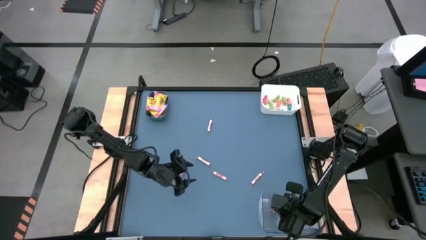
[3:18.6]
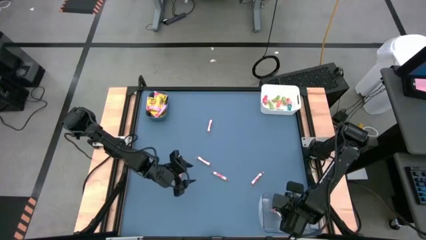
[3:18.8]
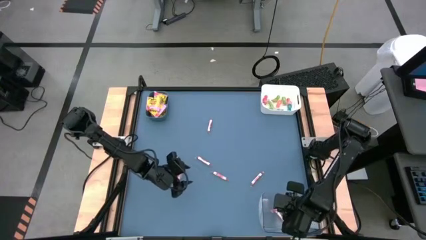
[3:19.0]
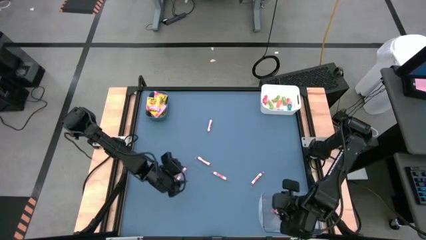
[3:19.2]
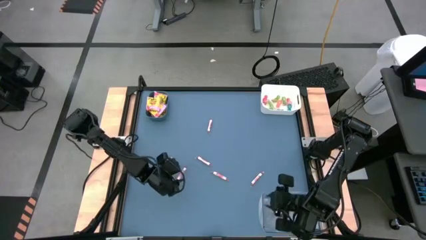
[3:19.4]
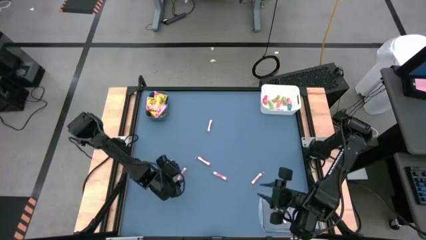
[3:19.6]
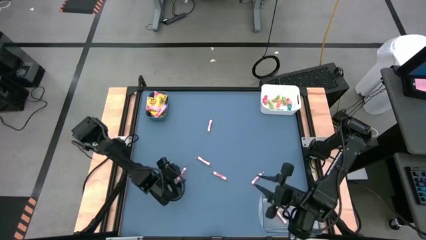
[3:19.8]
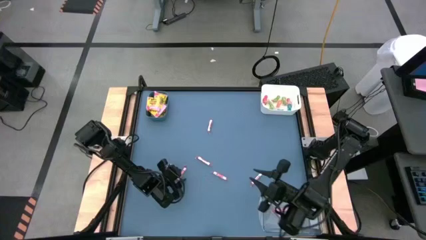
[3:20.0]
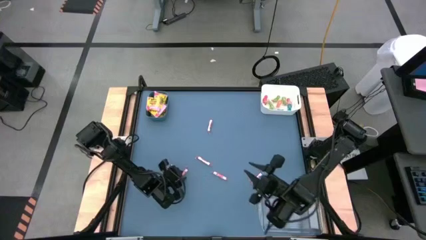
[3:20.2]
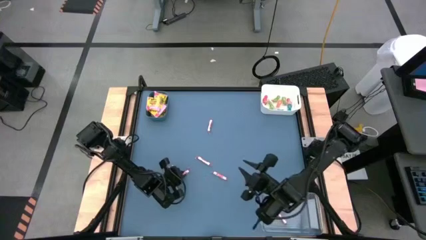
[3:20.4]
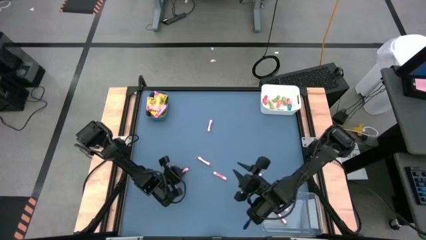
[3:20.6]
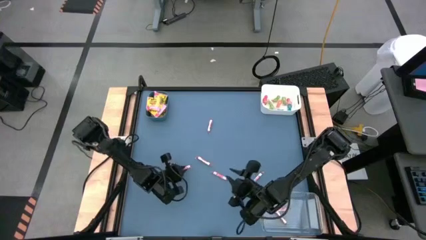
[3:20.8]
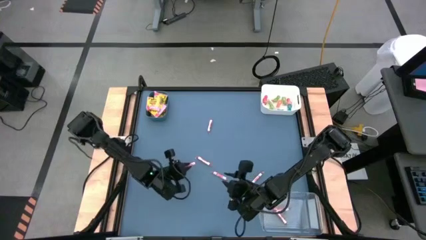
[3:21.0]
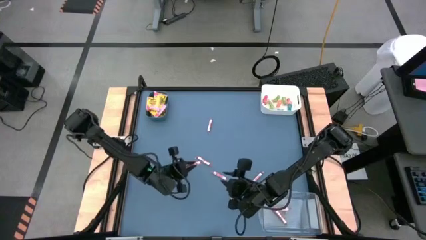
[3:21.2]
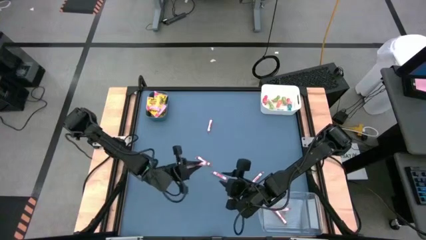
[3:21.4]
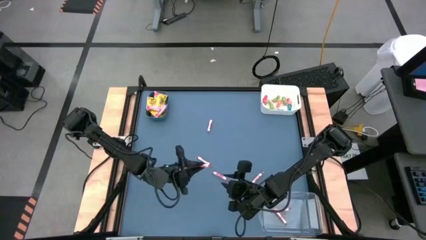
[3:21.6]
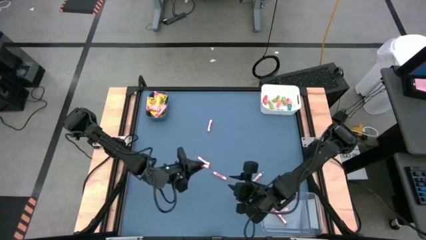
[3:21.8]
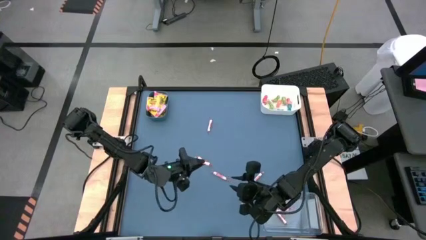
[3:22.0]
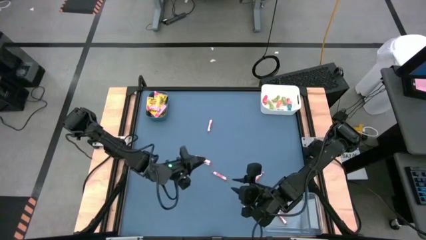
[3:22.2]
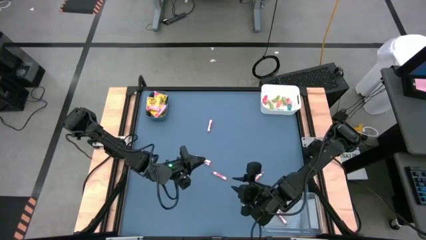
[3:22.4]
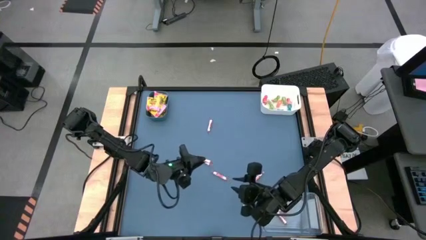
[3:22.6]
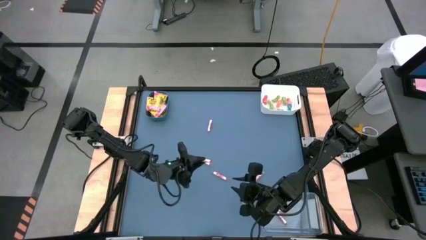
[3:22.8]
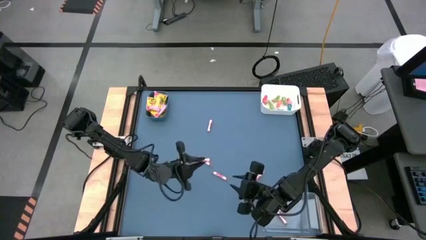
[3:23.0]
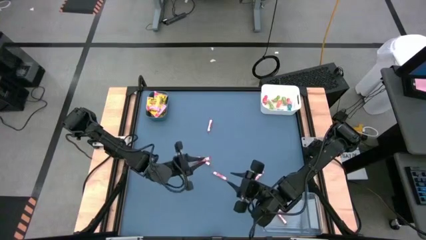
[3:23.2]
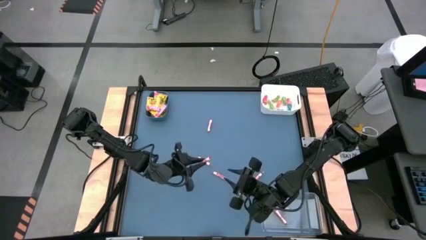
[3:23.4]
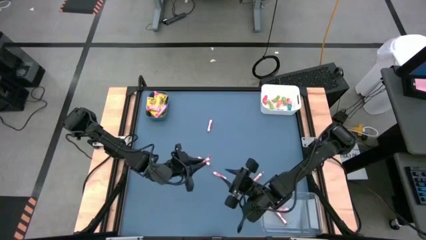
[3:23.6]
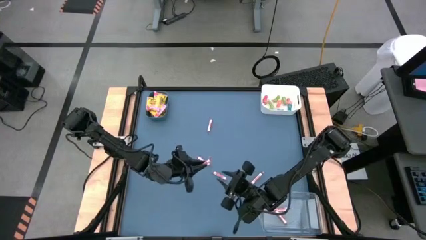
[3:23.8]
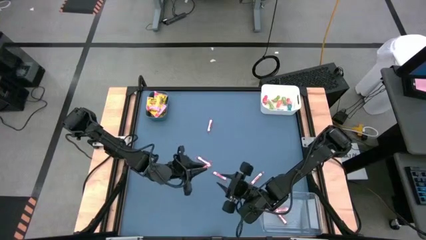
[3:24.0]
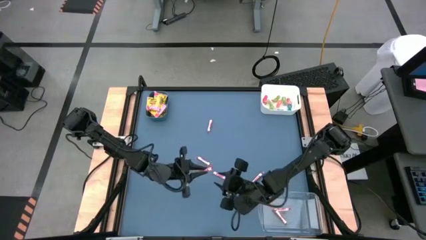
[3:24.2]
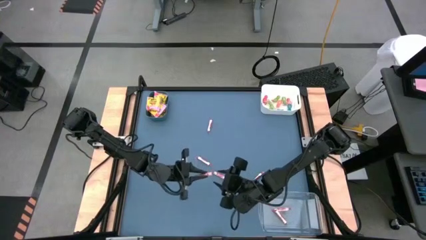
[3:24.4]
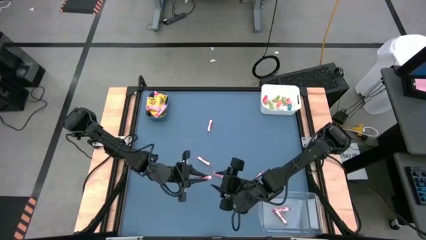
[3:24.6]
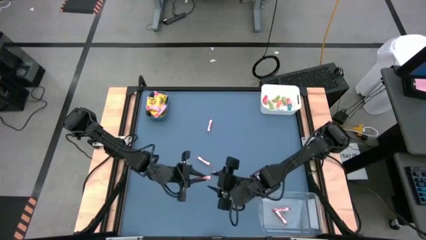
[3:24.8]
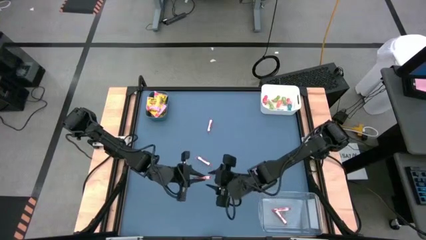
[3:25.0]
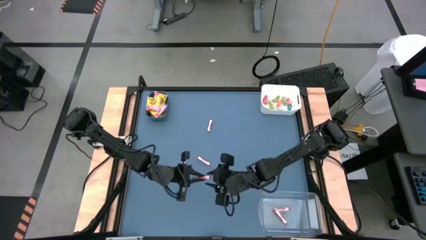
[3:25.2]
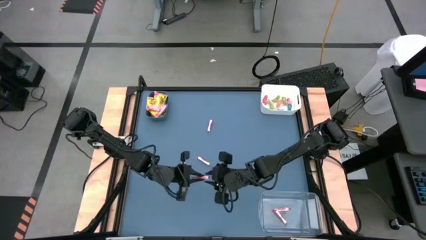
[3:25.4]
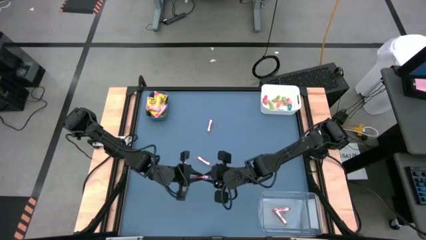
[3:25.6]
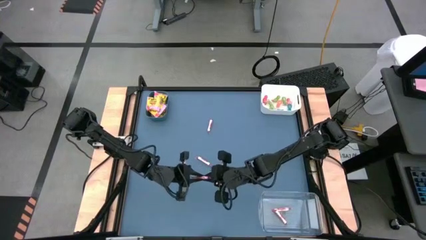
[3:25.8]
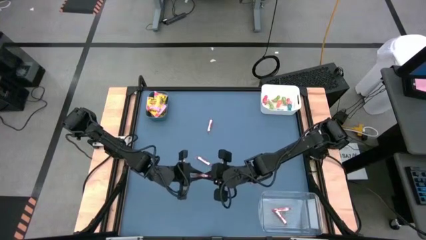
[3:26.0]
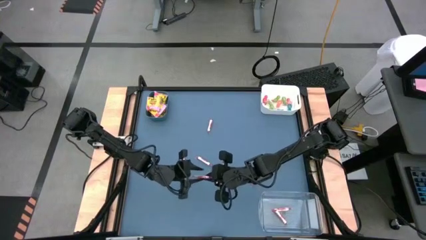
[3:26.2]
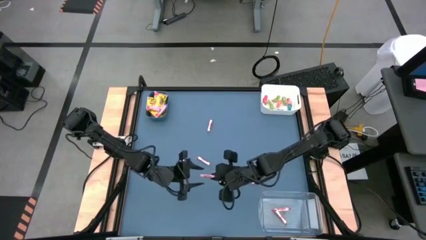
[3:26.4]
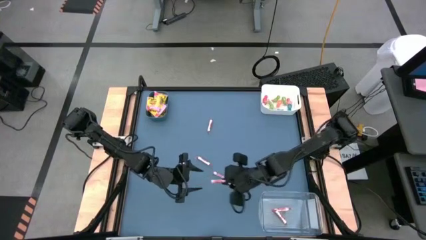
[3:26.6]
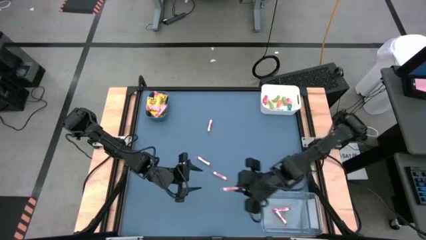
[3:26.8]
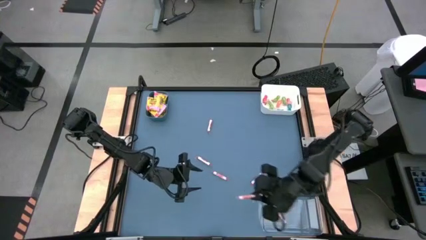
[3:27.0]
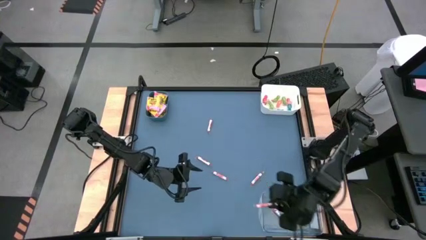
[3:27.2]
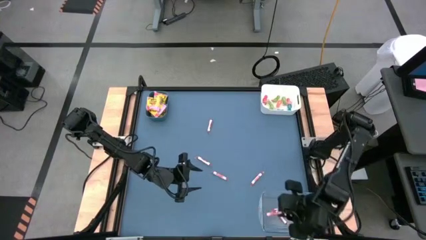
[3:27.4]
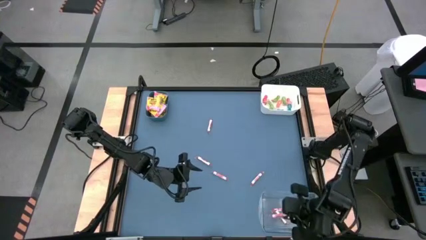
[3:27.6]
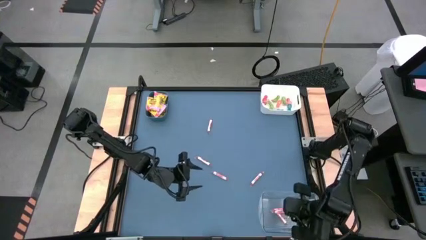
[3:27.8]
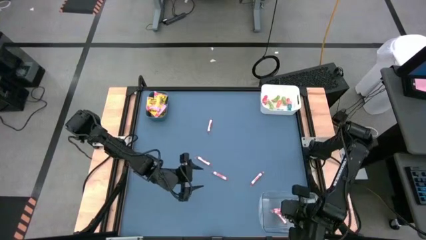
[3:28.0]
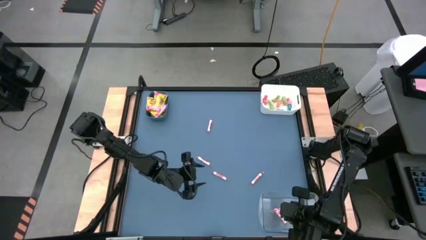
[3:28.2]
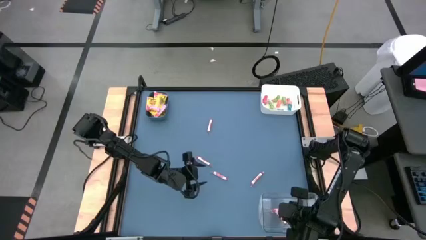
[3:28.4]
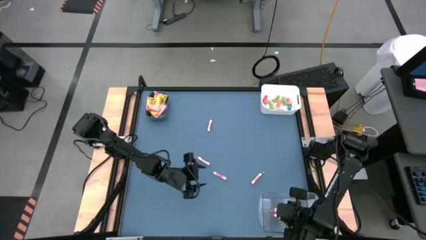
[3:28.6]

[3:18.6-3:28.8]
Task: Sort candy
Put the white candy into the transparent bin
